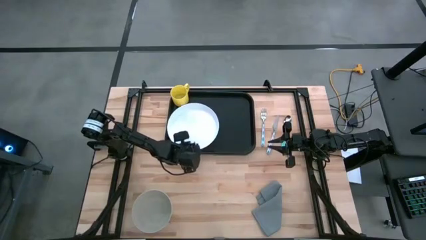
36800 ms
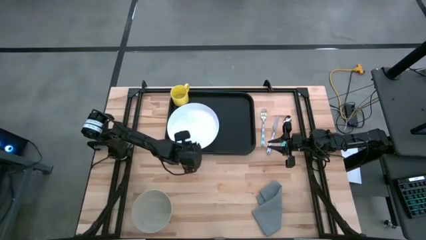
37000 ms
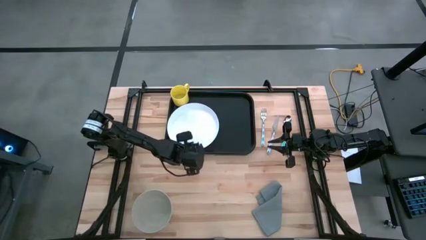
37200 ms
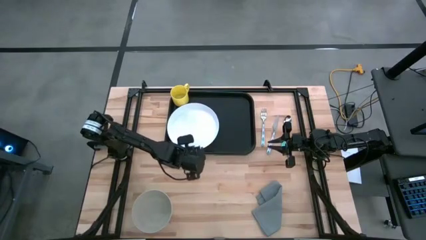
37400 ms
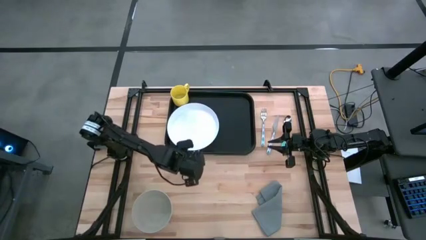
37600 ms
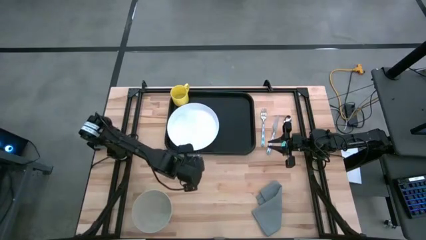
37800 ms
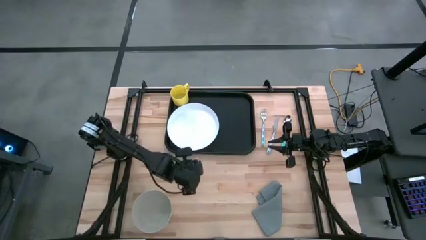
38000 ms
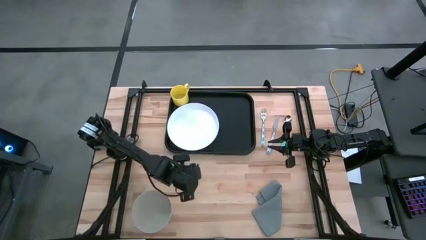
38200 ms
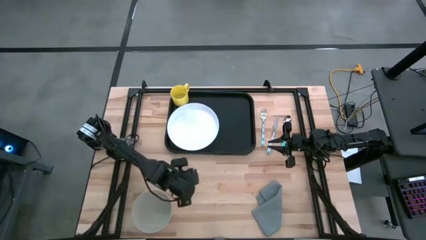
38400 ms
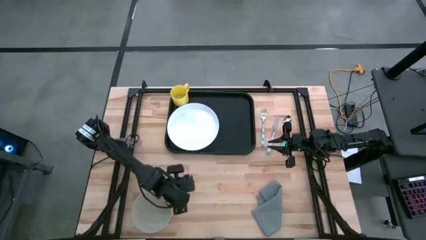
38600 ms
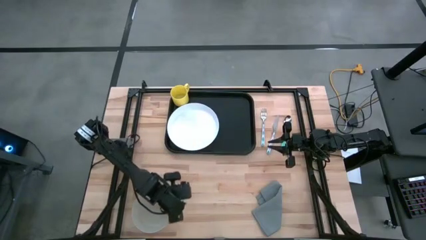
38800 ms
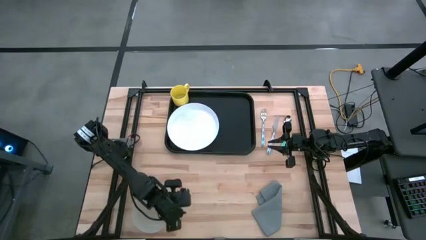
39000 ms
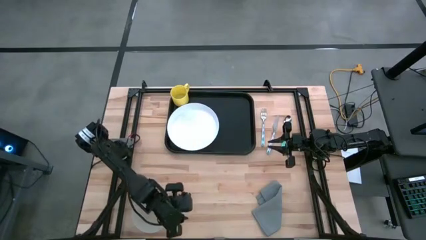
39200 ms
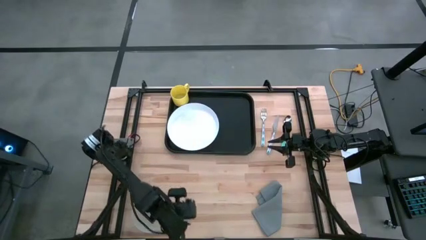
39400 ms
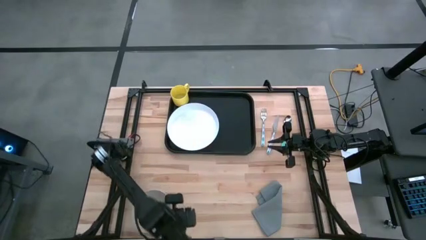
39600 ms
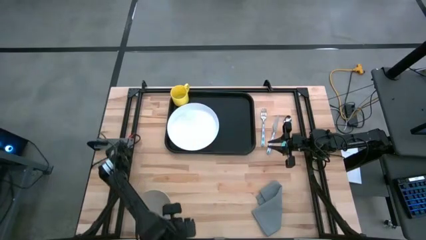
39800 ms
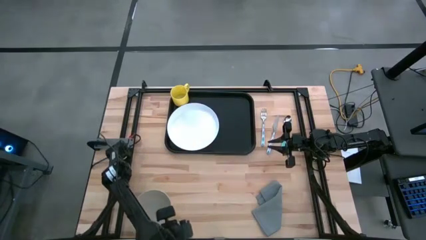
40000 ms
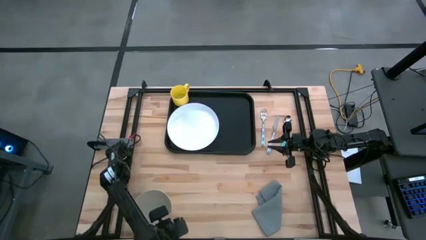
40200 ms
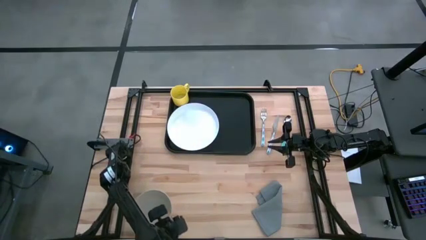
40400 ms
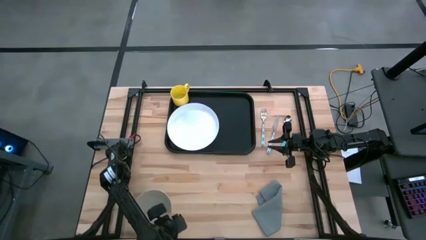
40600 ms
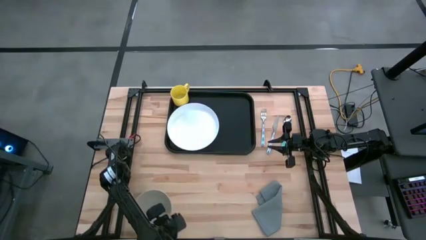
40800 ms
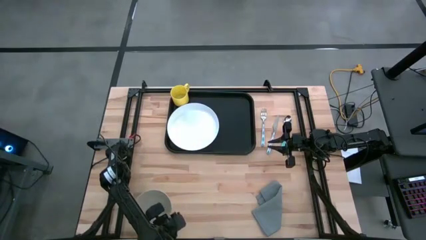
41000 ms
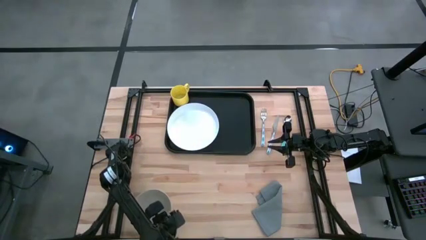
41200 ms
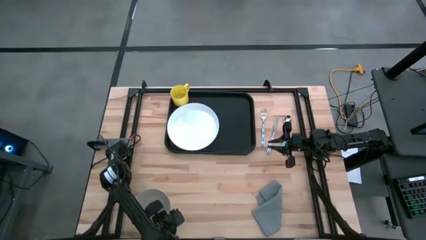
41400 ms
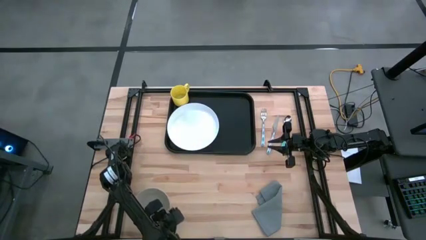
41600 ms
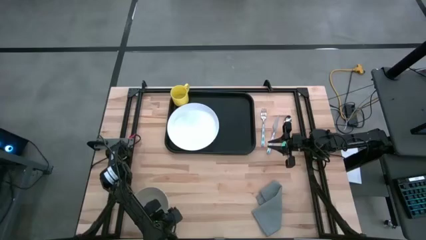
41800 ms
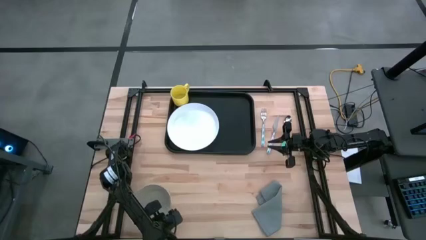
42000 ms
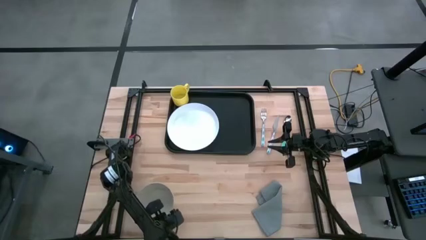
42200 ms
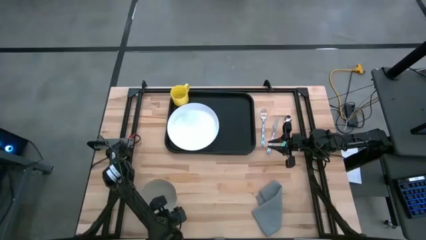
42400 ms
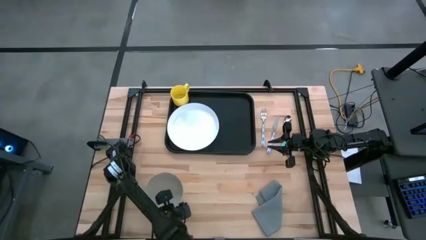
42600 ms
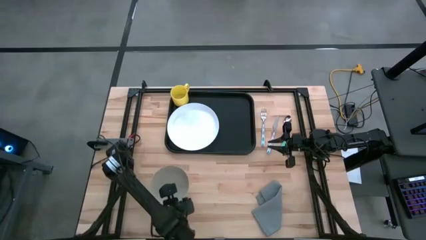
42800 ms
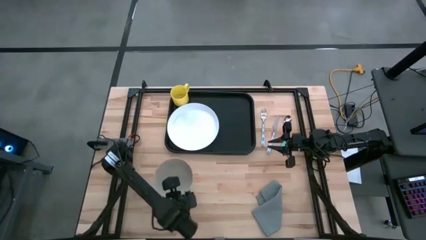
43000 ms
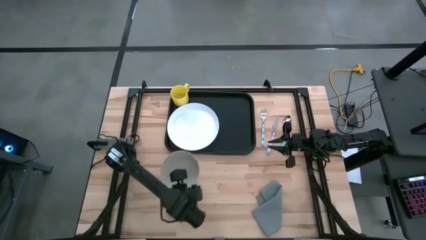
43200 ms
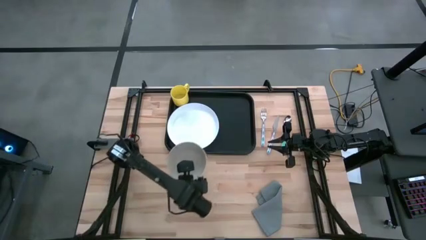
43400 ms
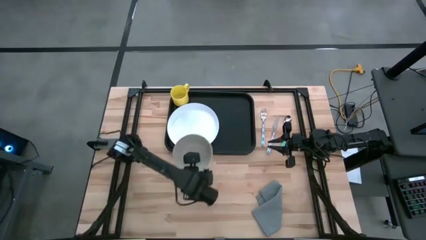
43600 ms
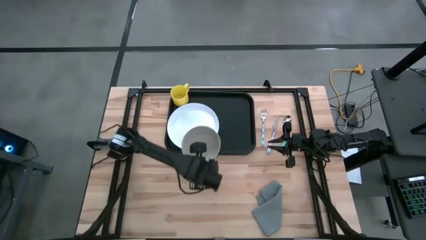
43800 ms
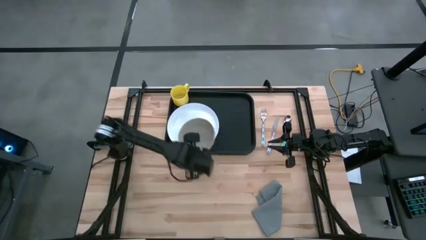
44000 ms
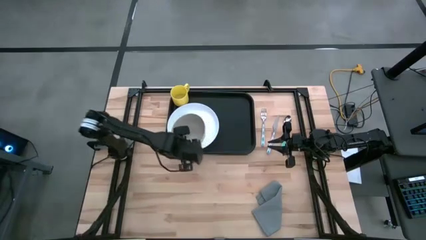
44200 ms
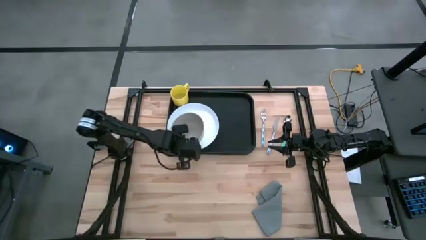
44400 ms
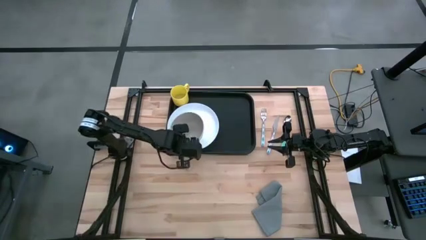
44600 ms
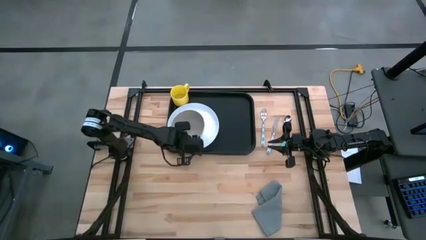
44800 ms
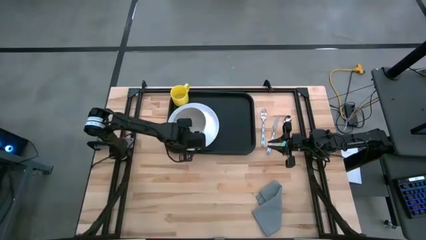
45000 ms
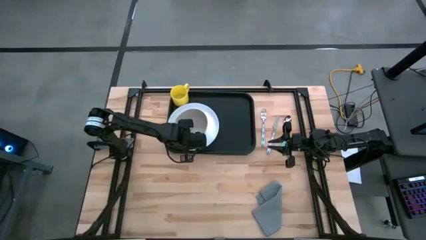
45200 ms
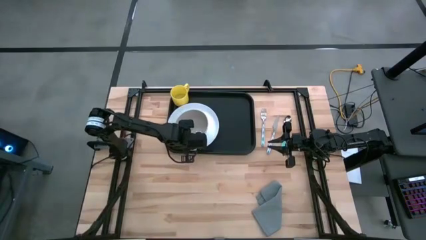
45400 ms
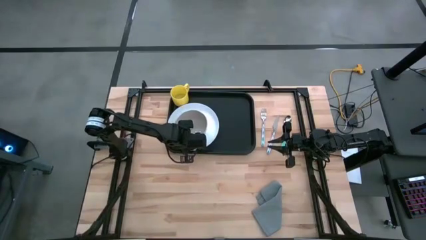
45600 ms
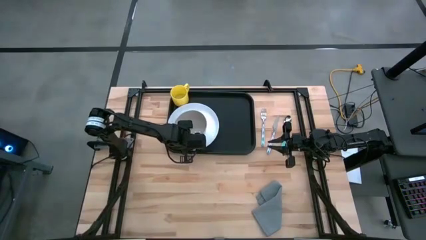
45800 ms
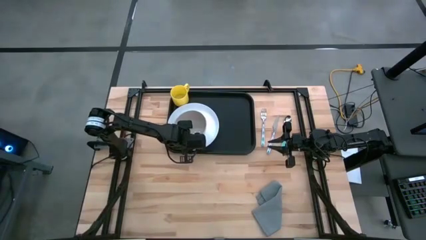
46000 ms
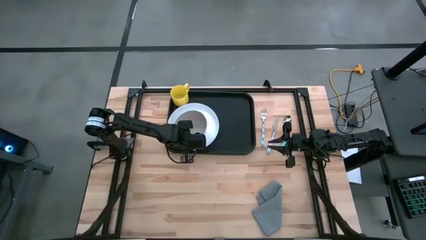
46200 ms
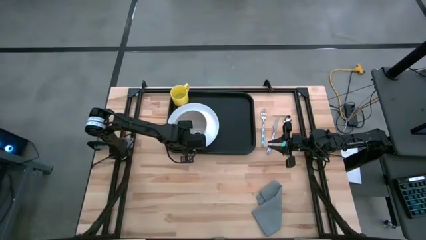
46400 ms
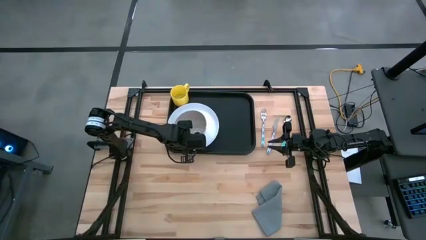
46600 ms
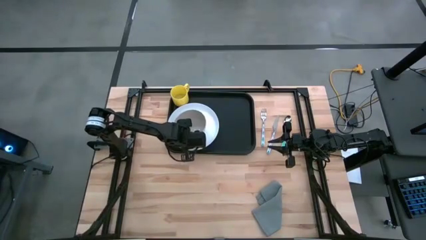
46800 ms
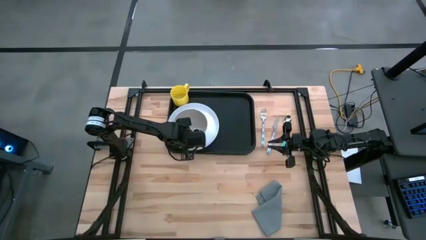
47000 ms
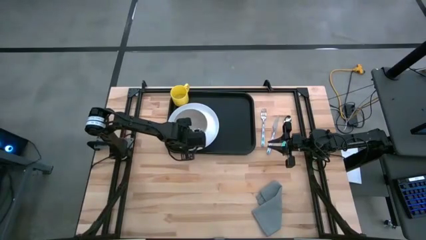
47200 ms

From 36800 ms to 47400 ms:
Task: Set up tray
Put the gray bowl on top of the white plate on the black tray
